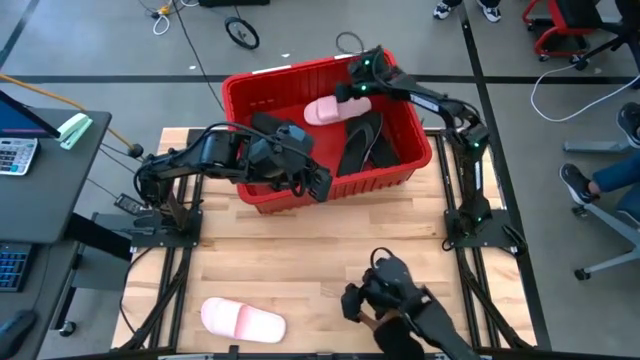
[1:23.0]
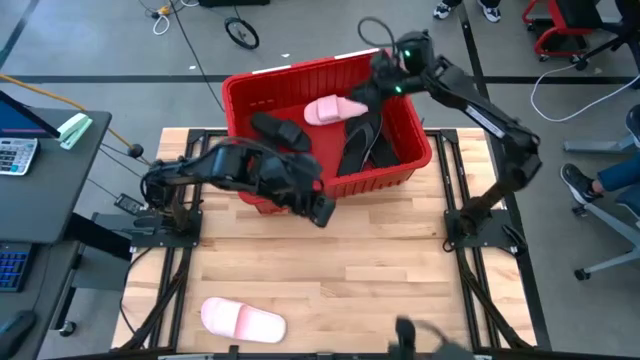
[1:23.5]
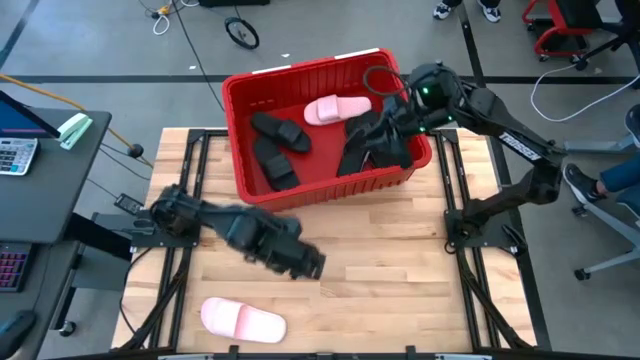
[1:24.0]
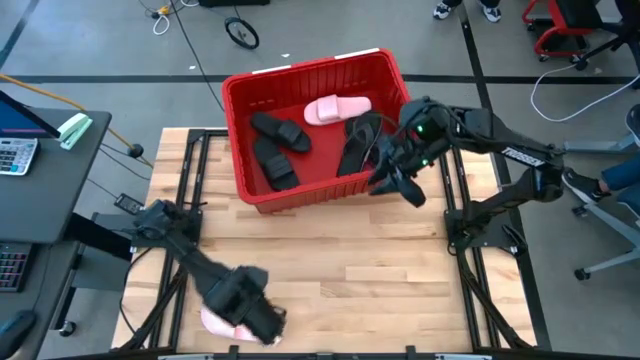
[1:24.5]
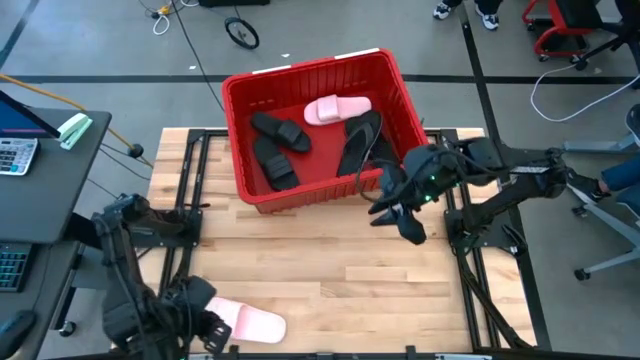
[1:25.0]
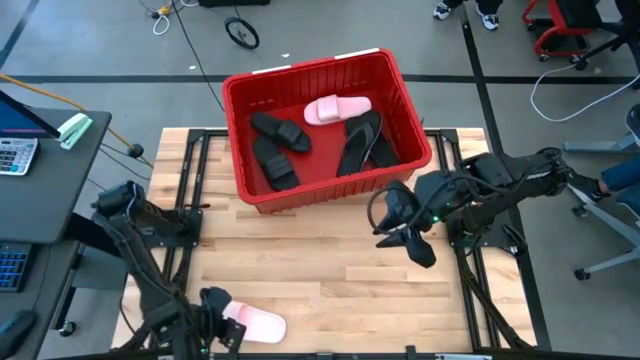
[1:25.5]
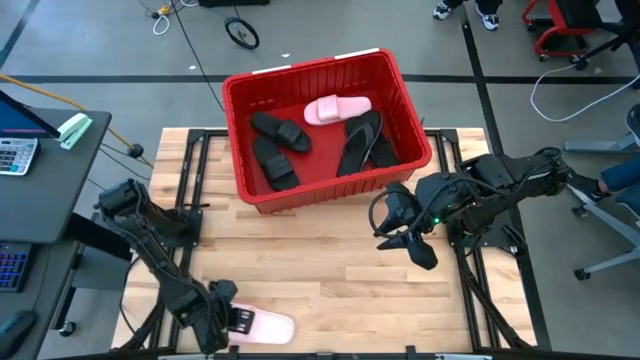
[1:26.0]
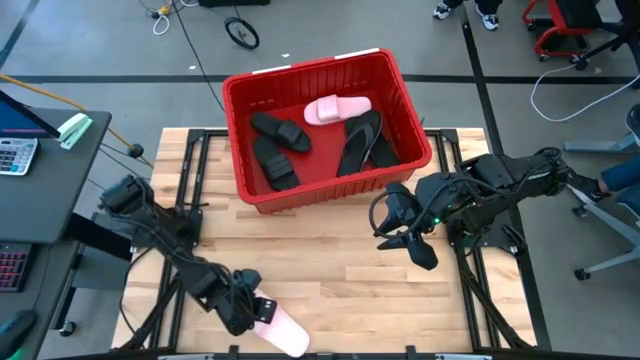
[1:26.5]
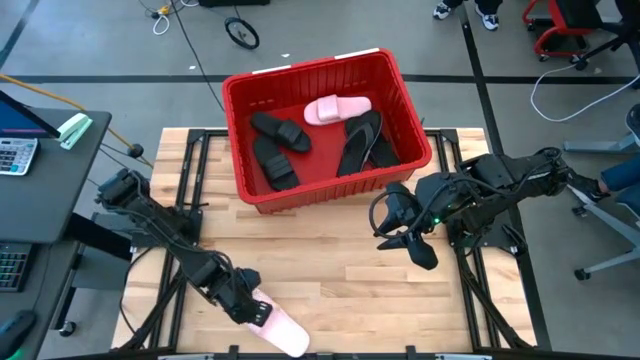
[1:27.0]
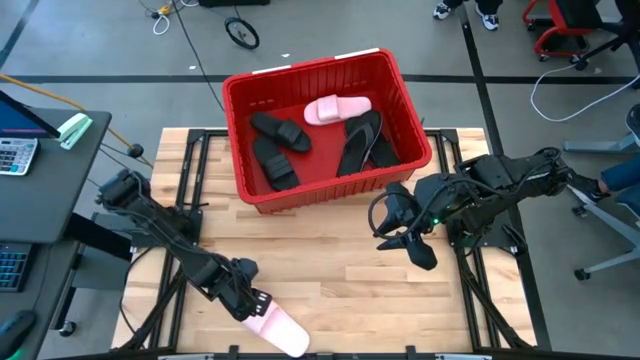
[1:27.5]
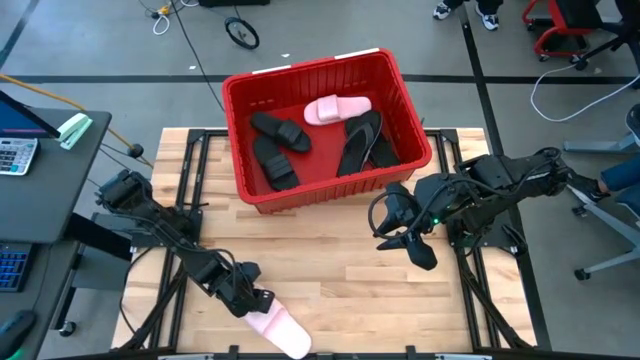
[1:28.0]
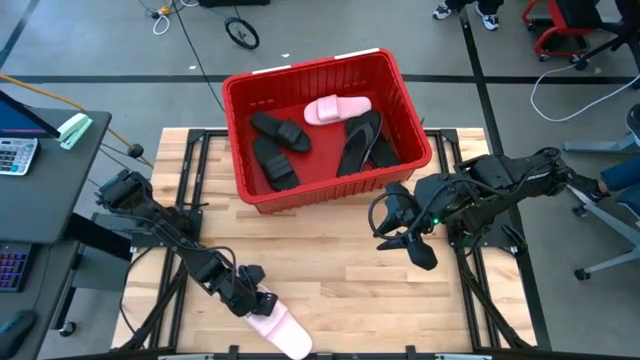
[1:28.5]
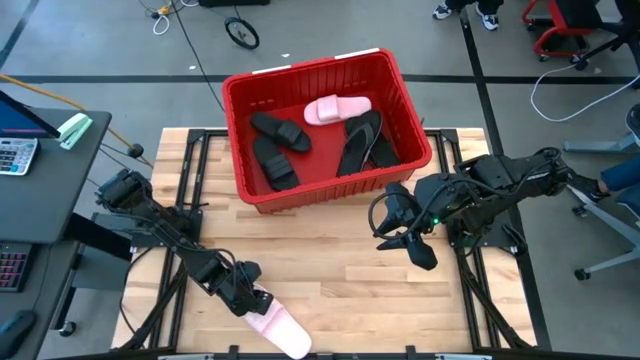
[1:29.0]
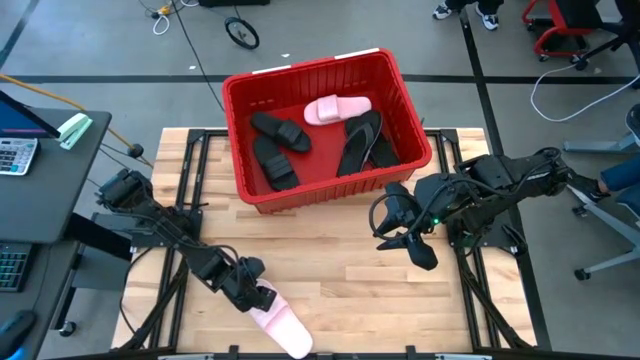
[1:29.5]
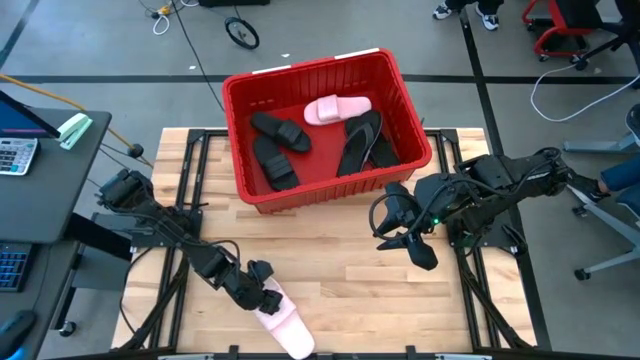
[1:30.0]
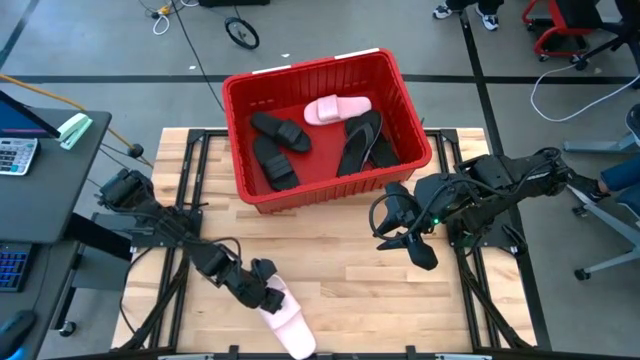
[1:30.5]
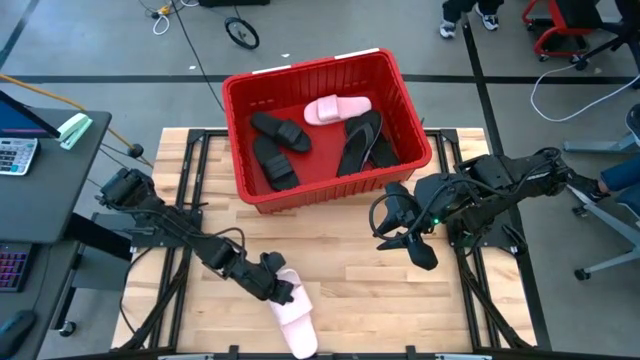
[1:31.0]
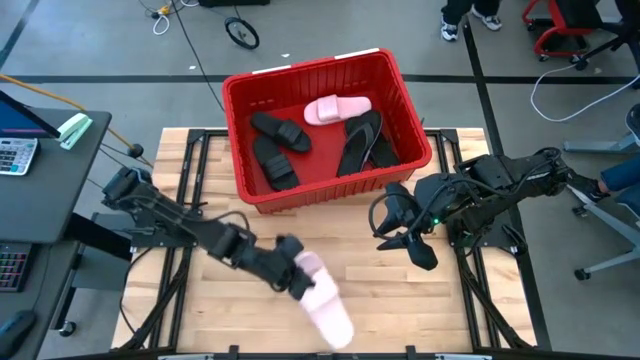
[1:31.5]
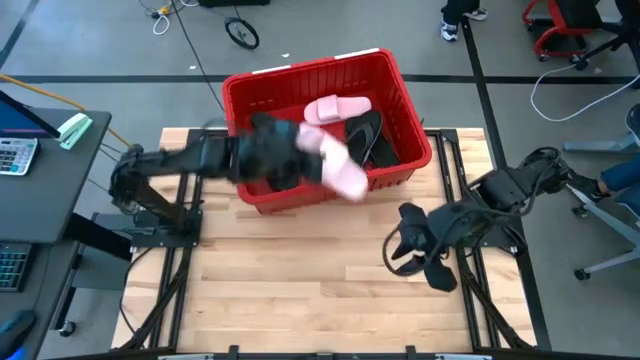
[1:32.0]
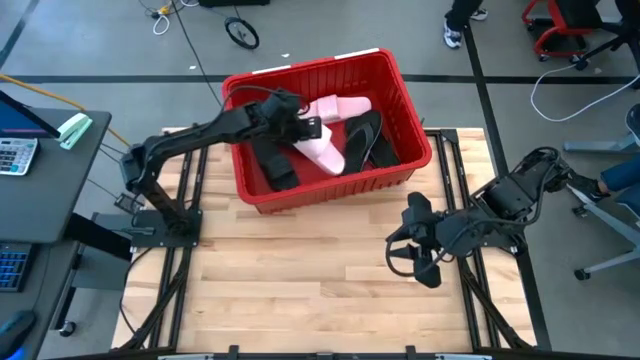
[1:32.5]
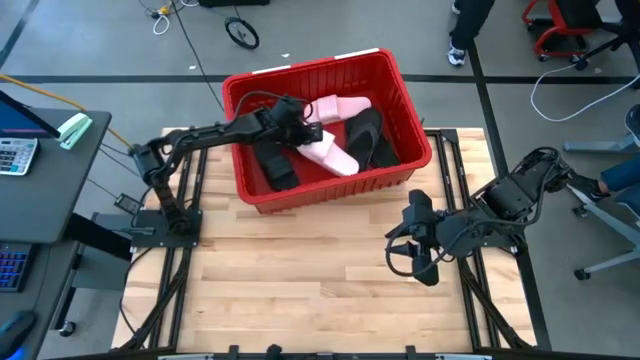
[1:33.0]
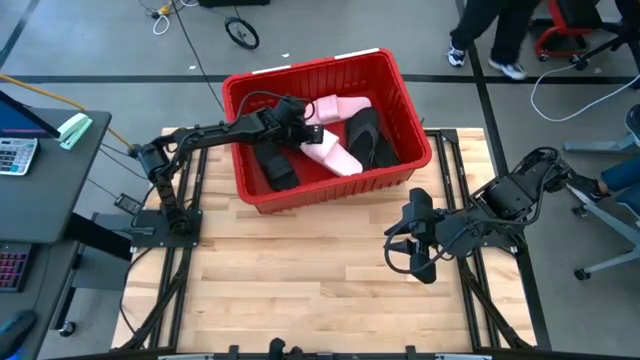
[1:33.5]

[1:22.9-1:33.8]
Task: Pick and place slides into bin
Put the pink slide into the red container

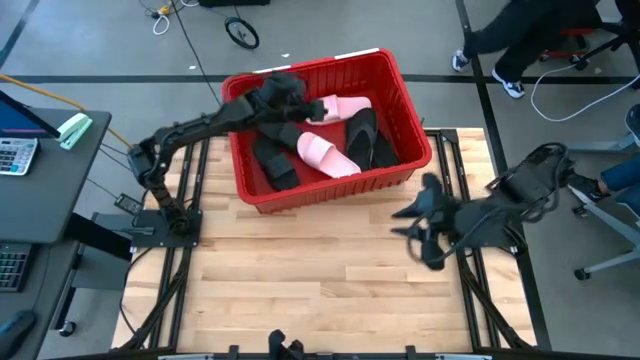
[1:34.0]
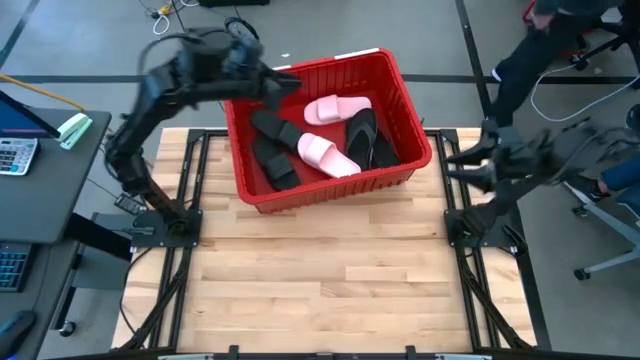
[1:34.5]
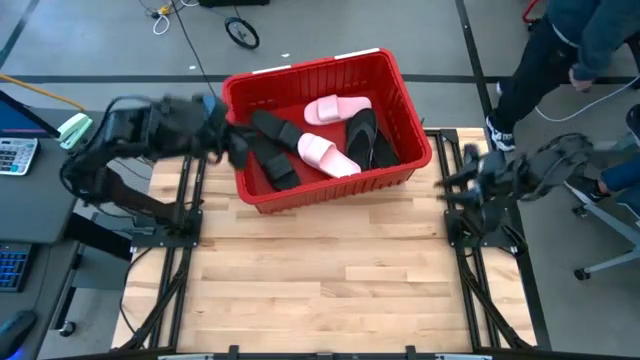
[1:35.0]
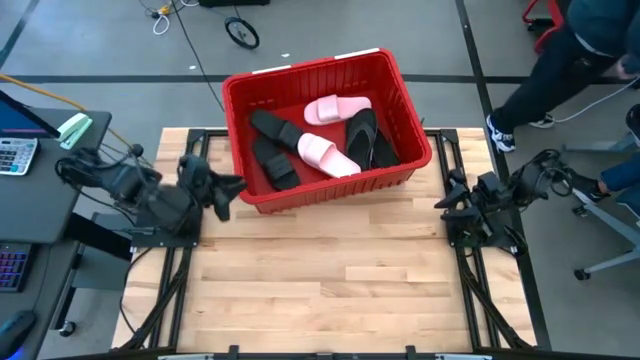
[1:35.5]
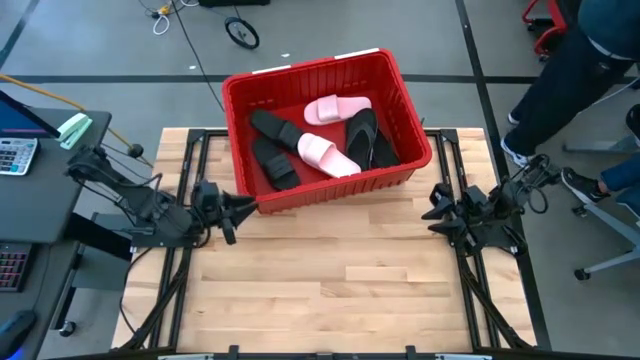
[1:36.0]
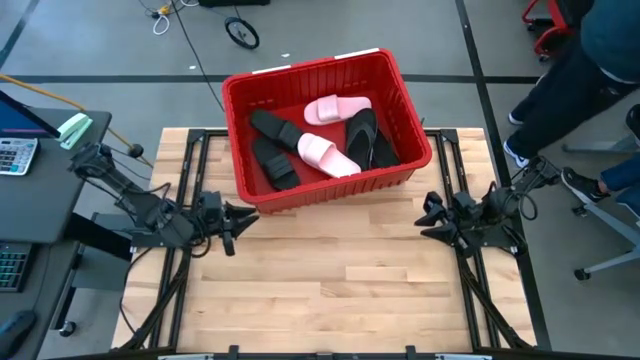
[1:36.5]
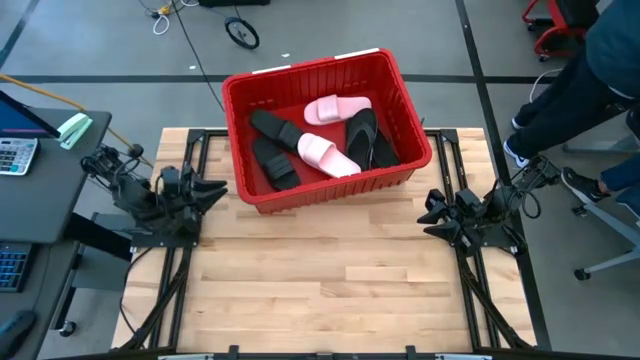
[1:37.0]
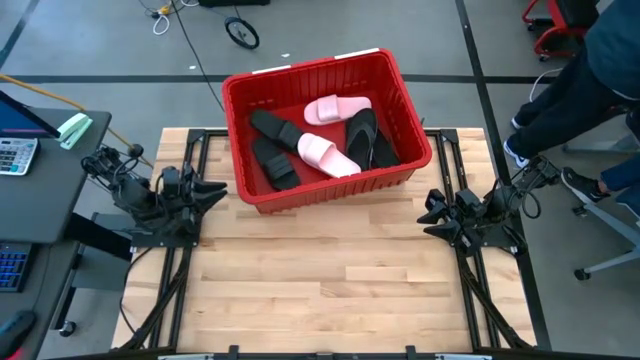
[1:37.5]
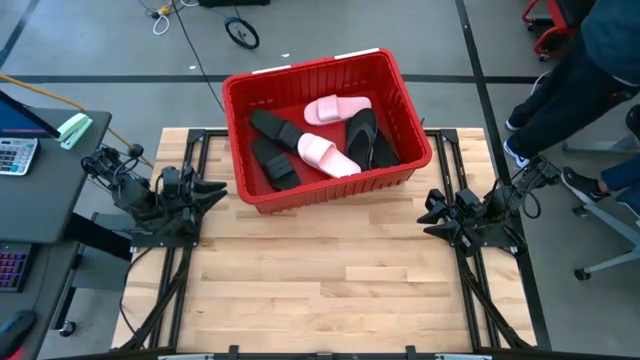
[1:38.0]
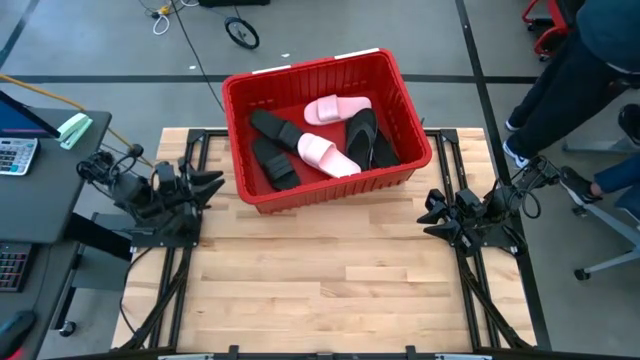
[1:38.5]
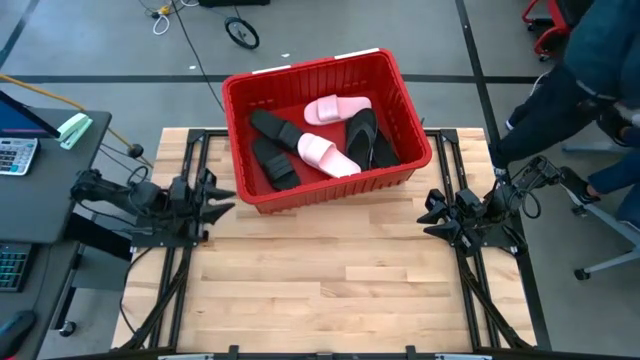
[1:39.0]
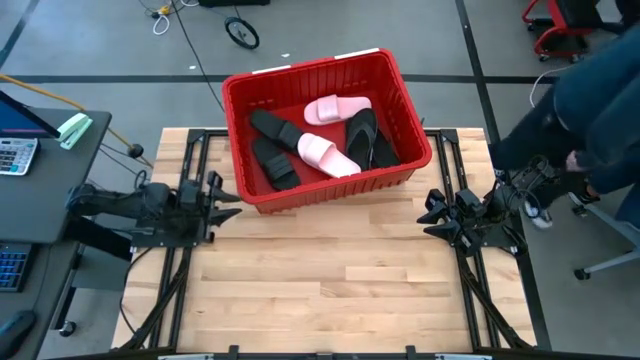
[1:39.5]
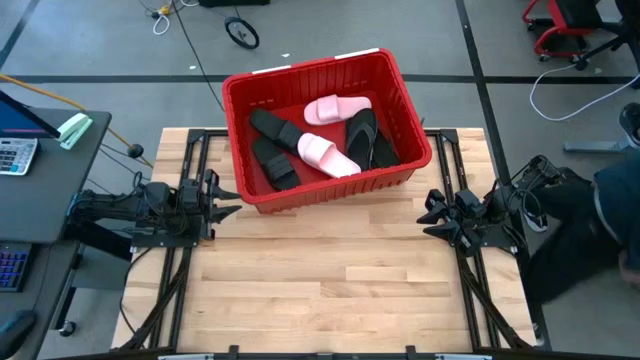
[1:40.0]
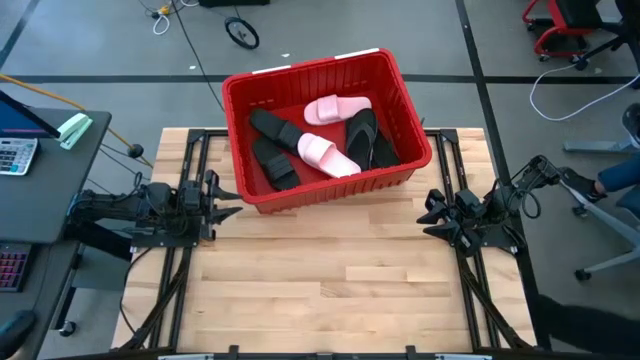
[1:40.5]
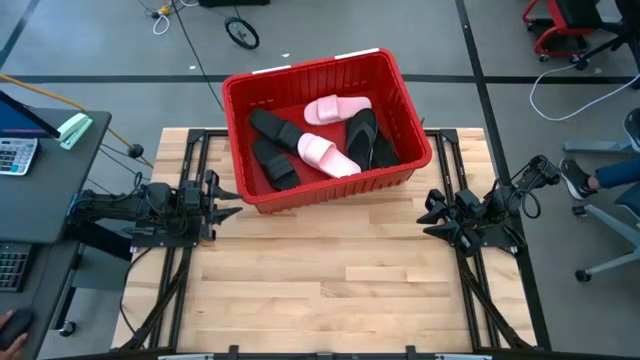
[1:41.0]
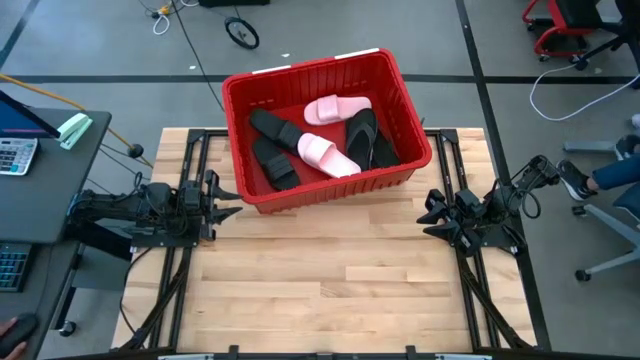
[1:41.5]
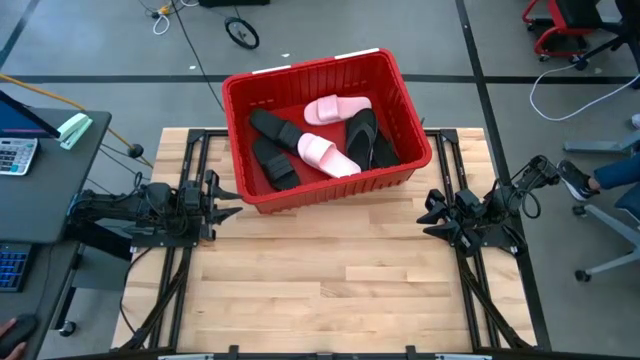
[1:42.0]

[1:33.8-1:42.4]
Return to Home Position
